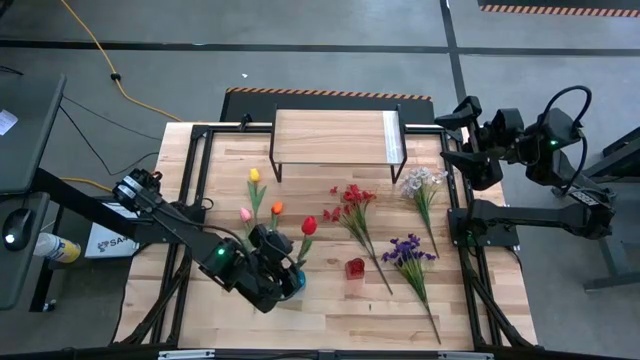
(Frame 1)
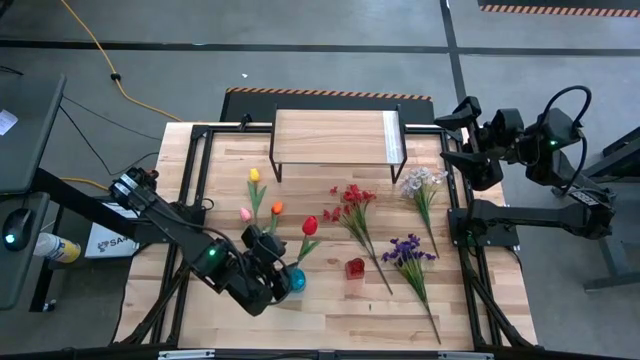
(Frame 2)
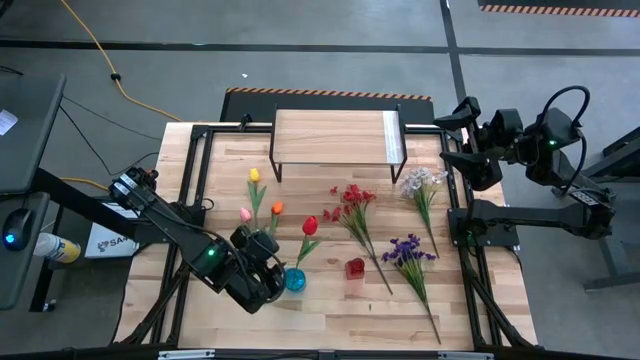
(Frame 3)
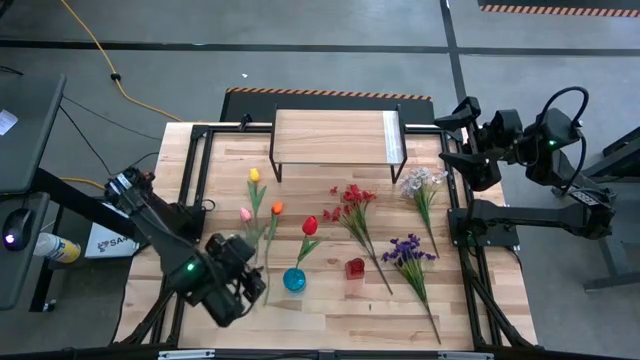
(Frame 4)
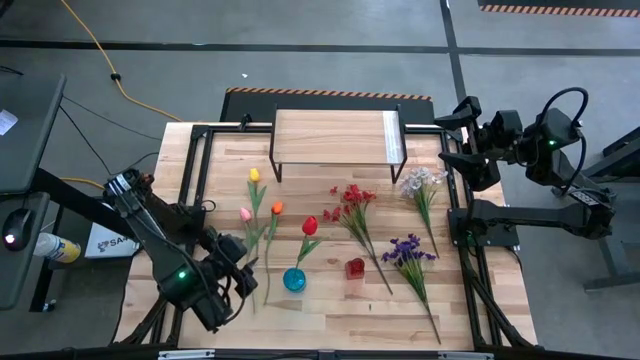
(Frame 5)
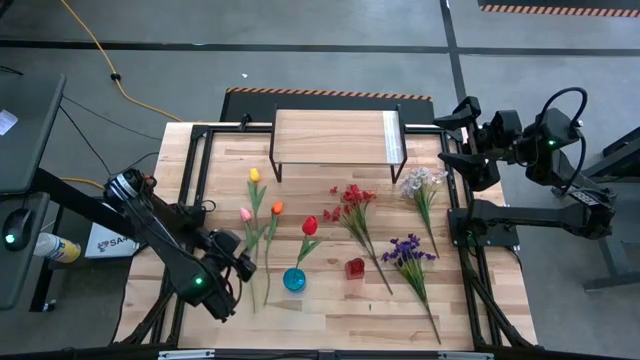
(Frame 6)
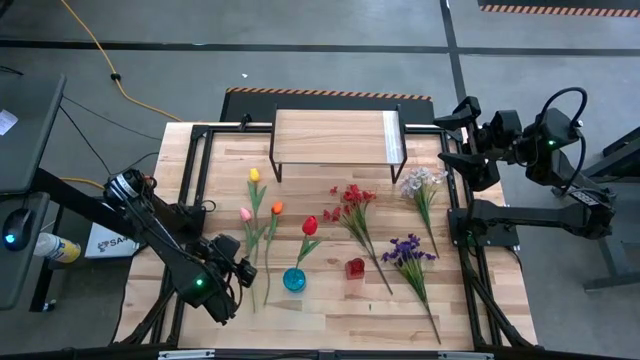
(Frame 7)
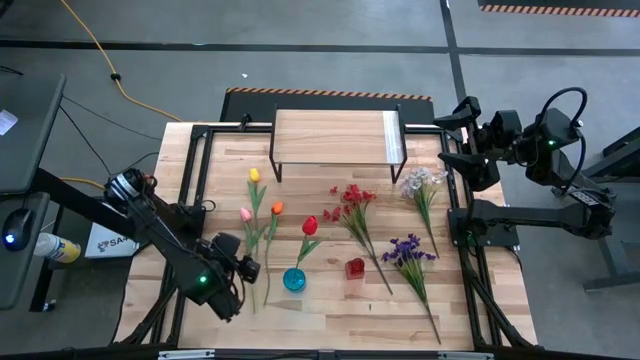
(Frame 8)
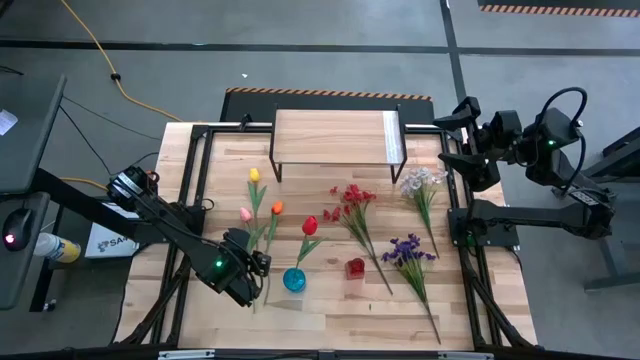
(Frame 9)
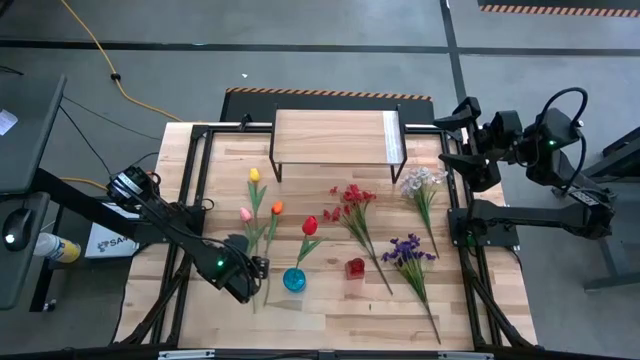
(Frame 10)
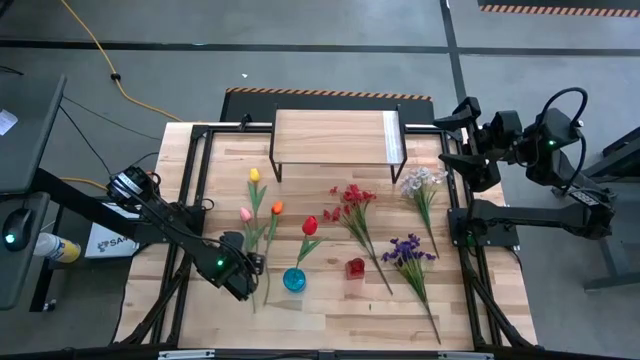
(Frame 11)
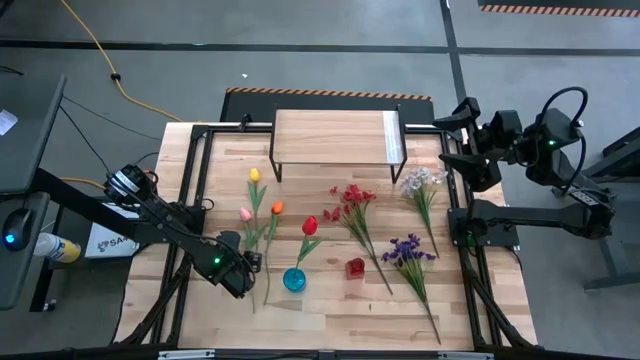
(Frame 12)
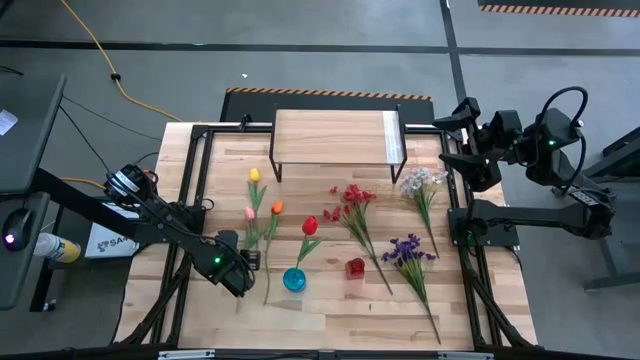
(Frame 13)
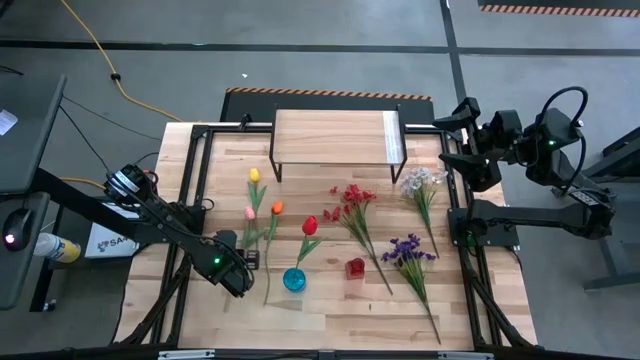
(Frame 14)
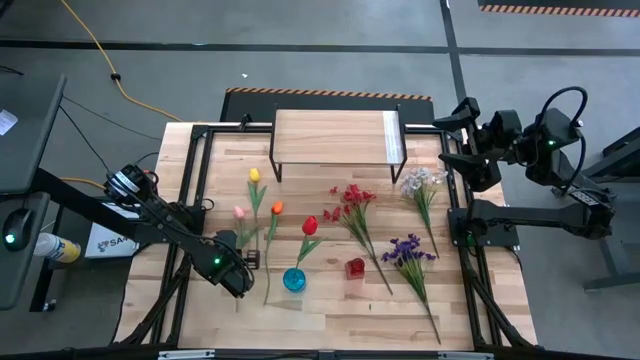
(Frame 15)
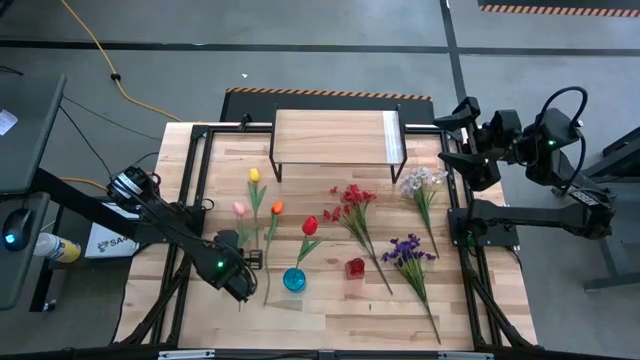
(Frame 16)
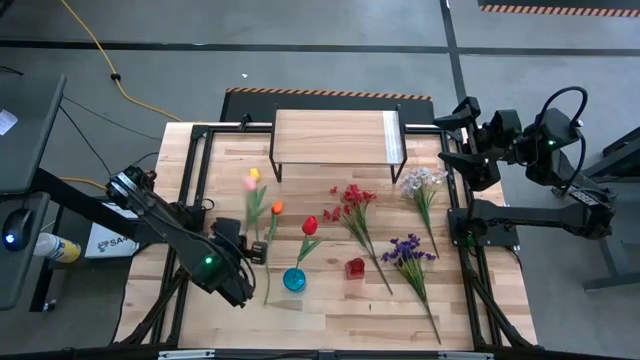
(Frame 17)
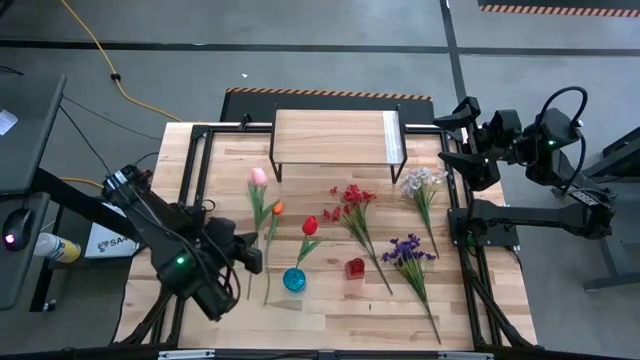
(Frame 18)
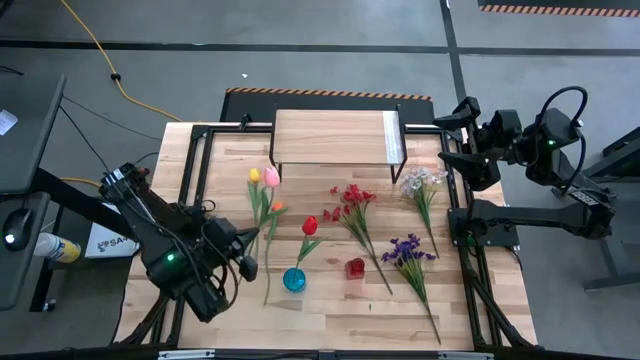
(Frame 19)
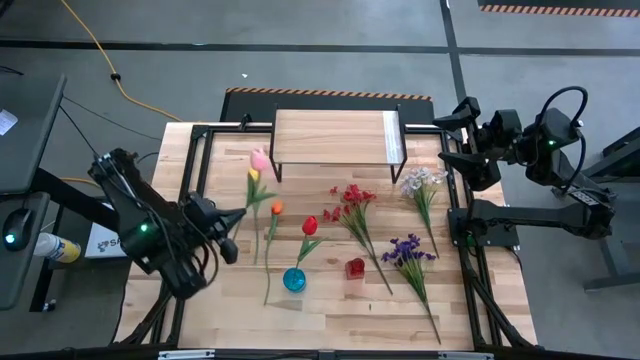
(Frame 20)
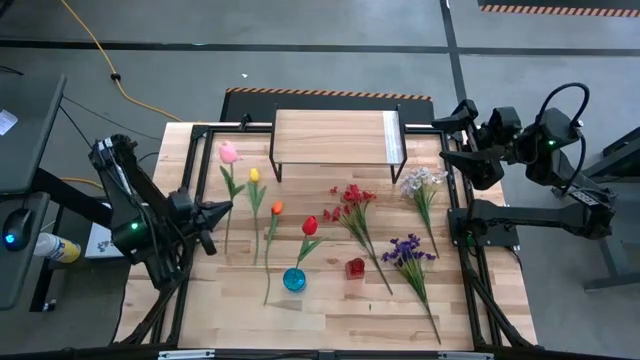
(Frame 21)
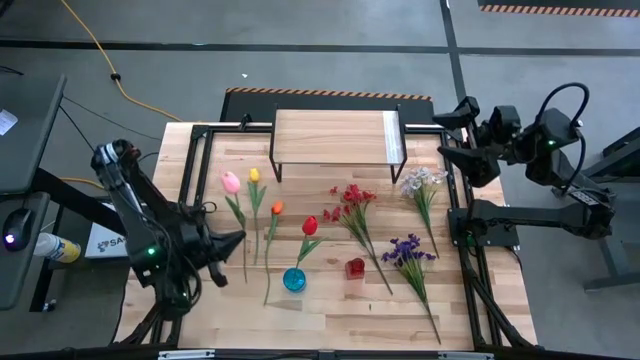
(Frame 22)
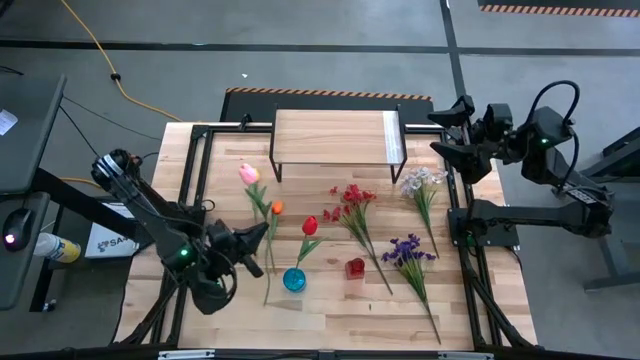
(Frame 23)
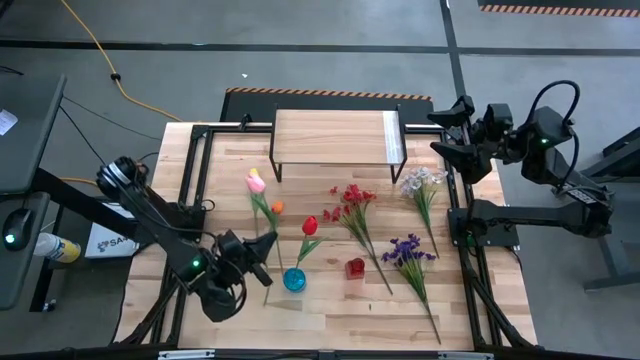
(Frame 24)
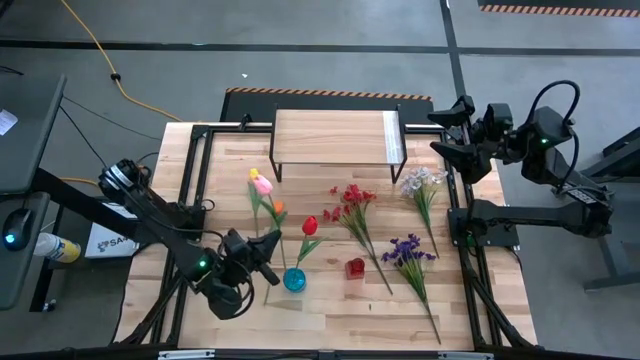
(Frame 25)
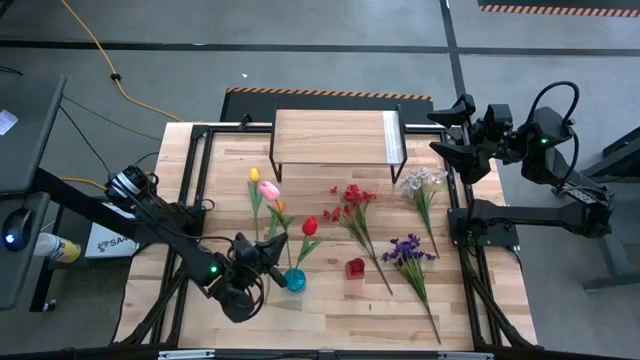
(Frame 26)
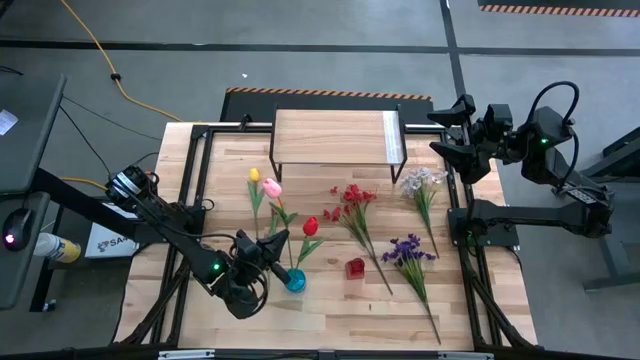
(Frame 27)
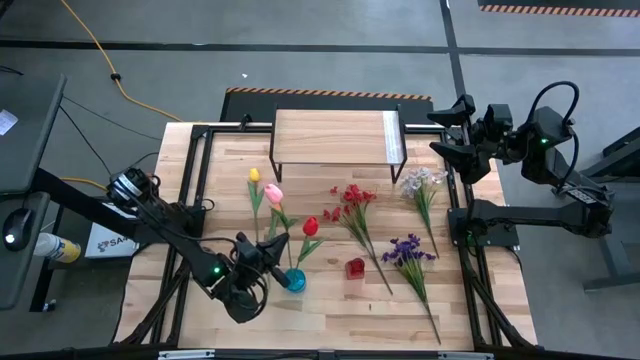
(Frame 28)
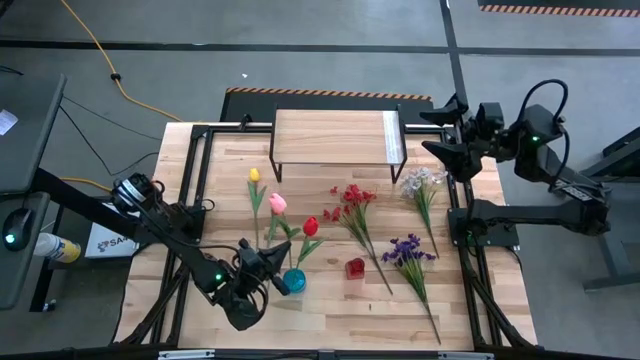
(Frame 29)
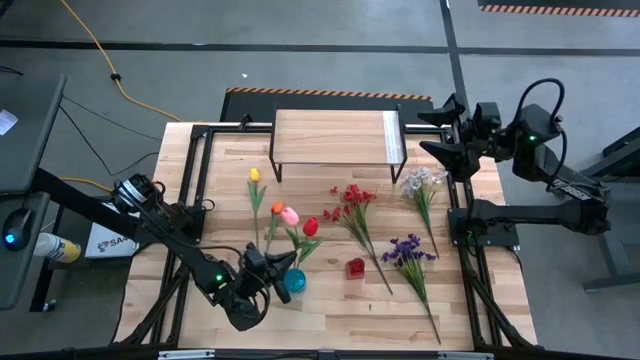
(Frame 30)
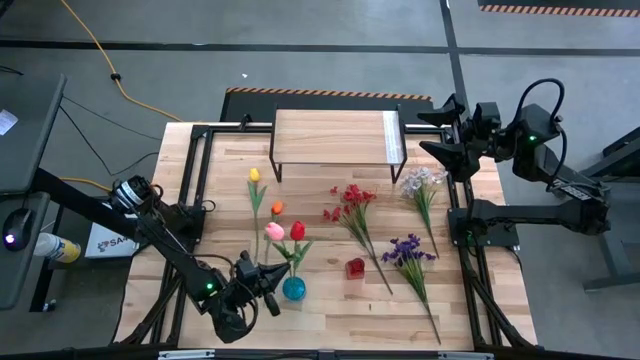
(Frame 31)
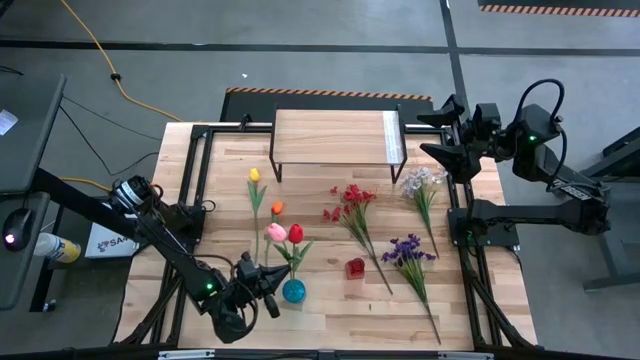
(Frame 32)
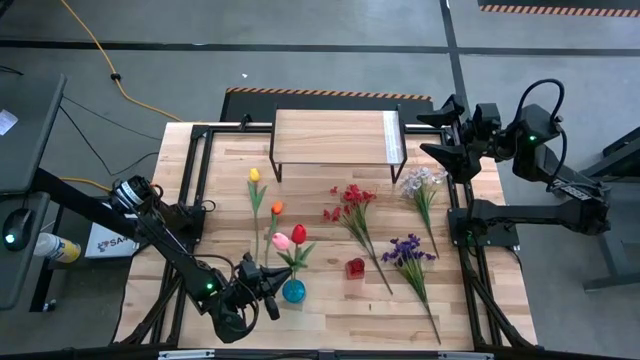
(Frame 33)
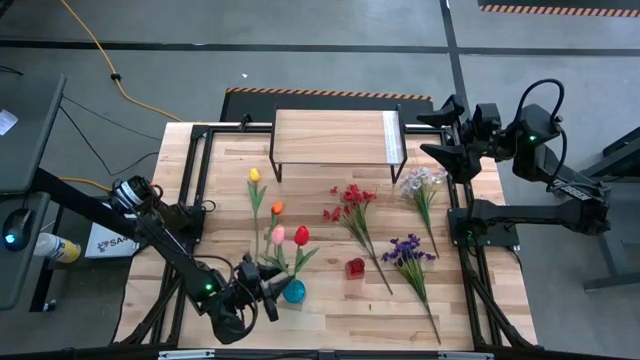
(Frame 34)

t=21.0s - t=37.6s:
Task: Pick and place flowers into a vace then onto a shelf
Put the pink tulip into the blue transparent vase
